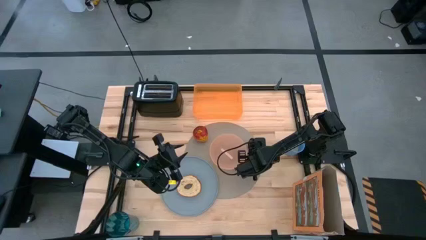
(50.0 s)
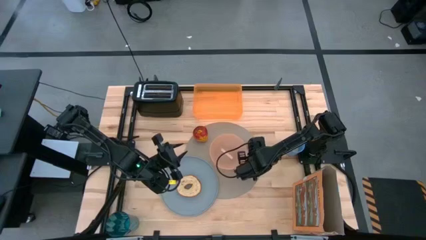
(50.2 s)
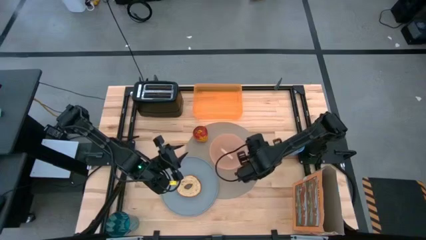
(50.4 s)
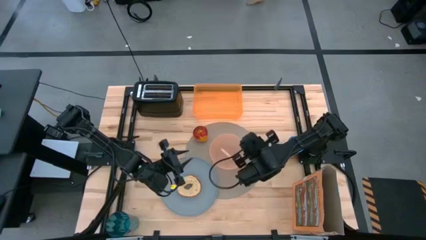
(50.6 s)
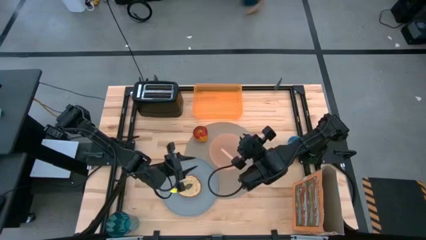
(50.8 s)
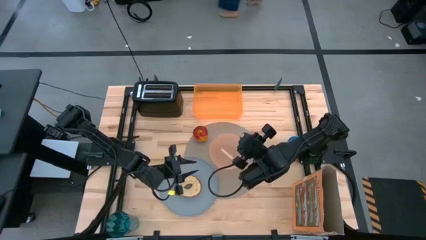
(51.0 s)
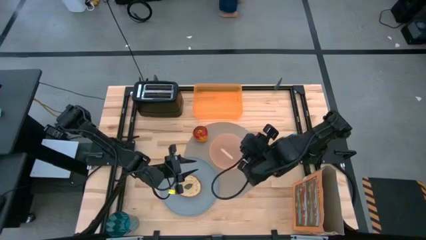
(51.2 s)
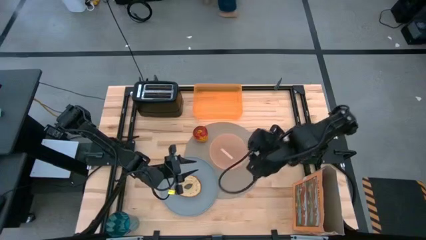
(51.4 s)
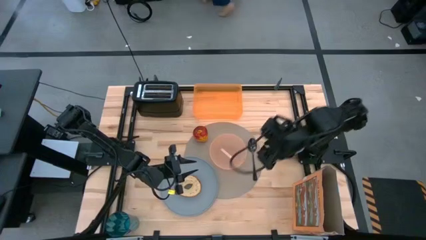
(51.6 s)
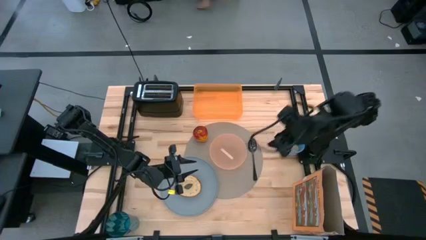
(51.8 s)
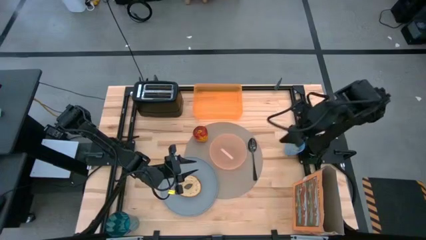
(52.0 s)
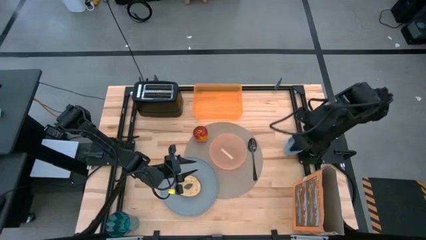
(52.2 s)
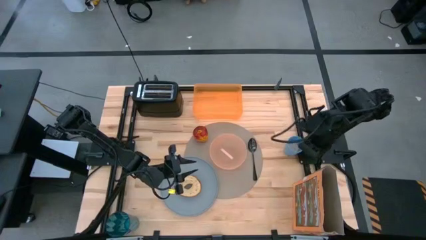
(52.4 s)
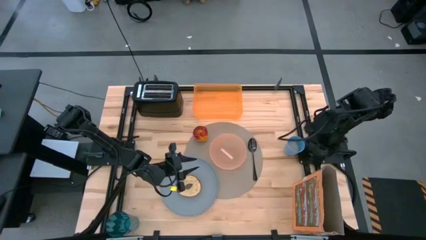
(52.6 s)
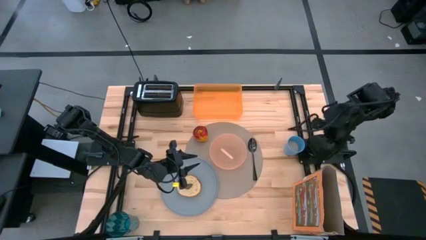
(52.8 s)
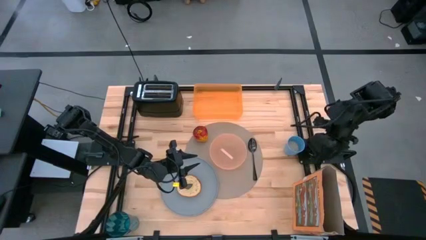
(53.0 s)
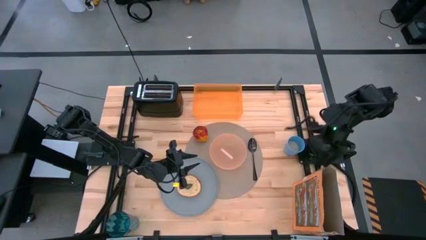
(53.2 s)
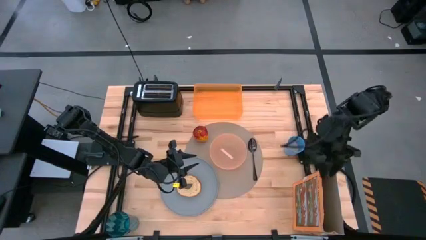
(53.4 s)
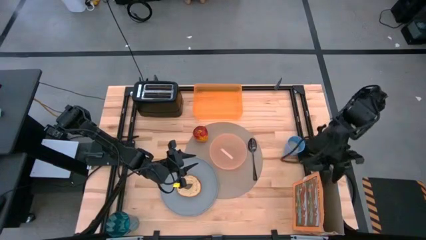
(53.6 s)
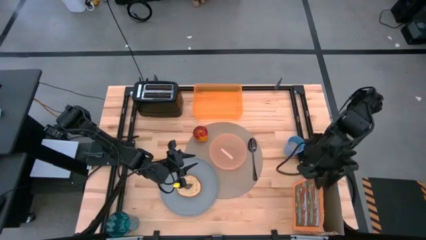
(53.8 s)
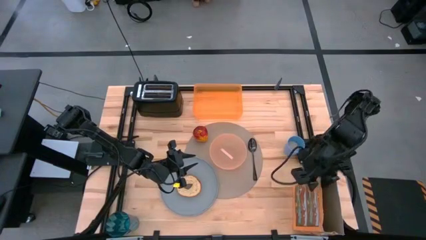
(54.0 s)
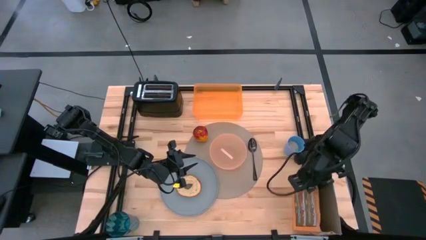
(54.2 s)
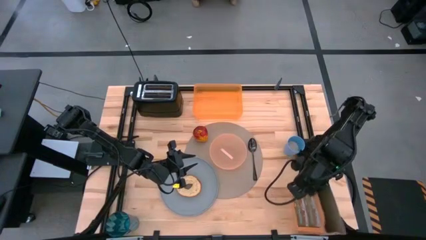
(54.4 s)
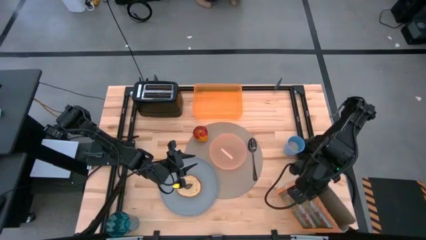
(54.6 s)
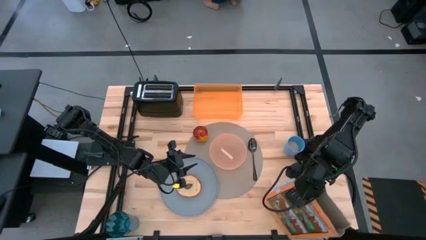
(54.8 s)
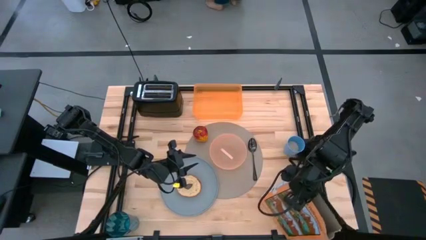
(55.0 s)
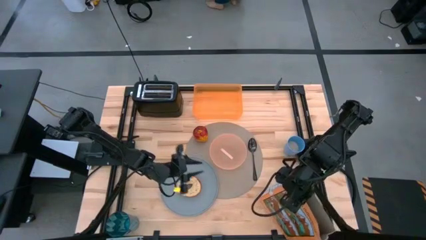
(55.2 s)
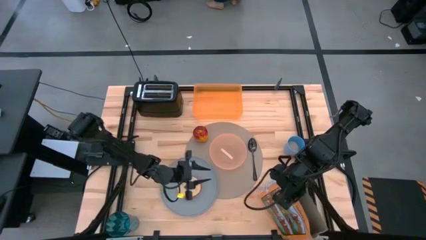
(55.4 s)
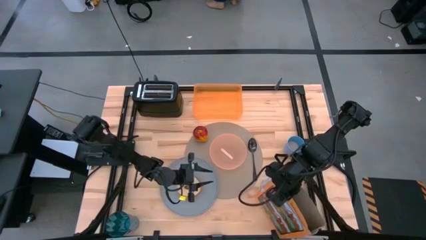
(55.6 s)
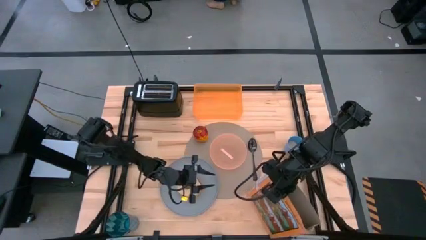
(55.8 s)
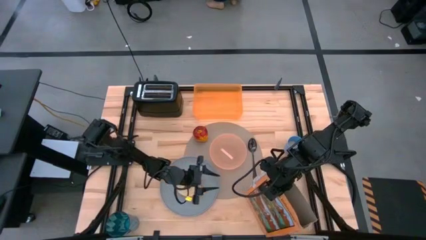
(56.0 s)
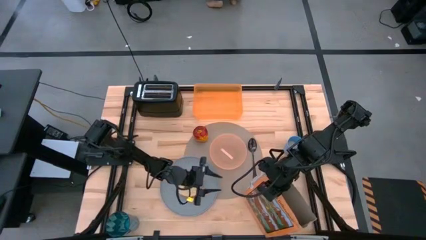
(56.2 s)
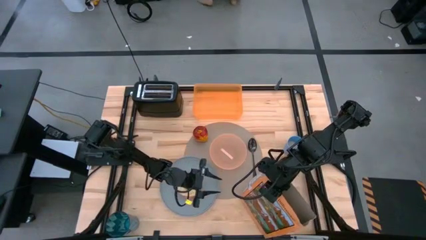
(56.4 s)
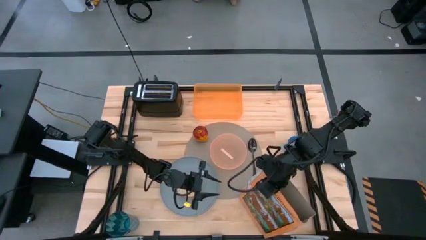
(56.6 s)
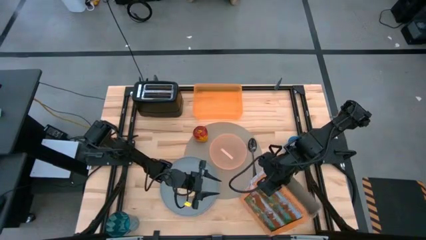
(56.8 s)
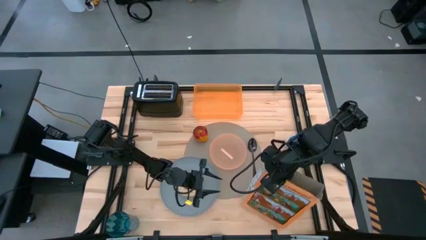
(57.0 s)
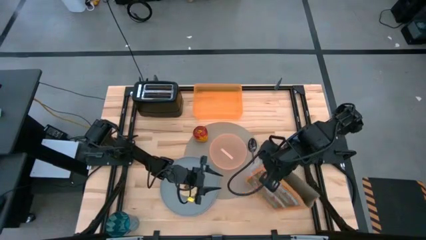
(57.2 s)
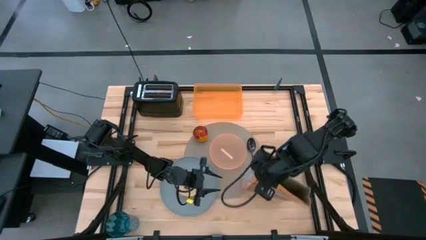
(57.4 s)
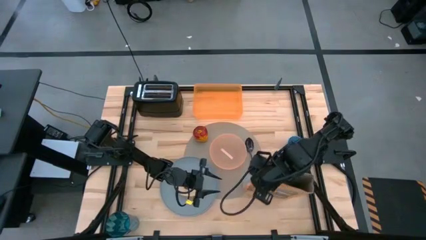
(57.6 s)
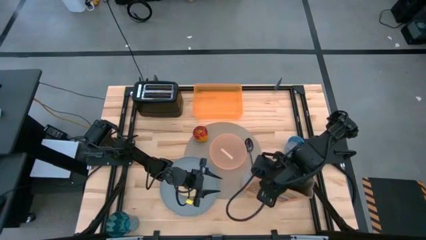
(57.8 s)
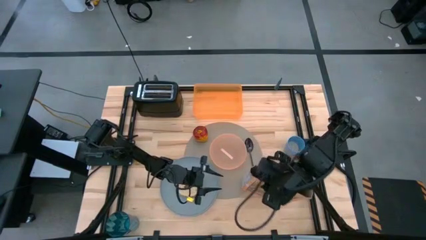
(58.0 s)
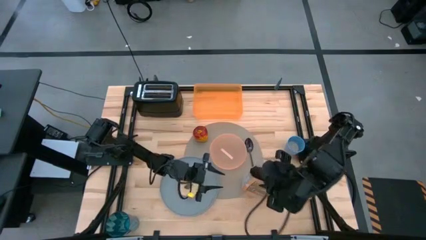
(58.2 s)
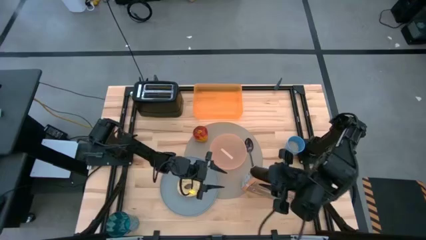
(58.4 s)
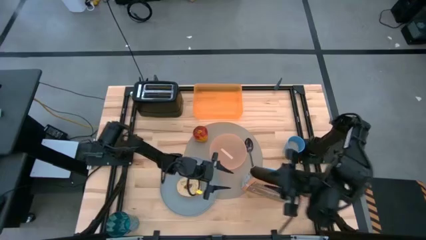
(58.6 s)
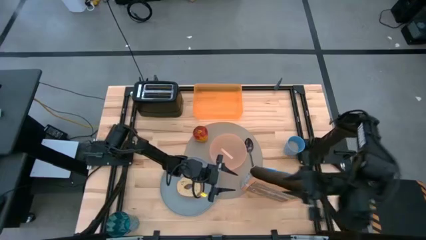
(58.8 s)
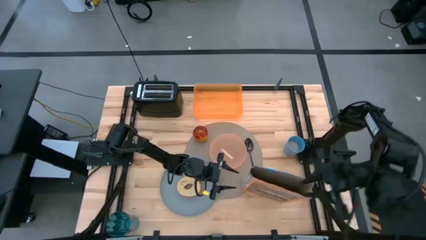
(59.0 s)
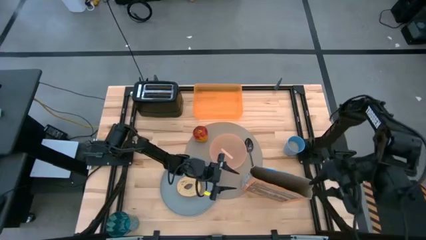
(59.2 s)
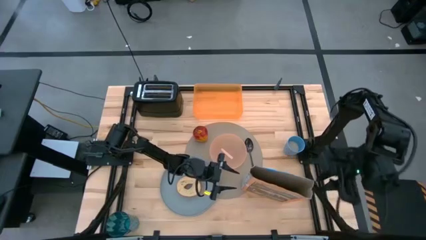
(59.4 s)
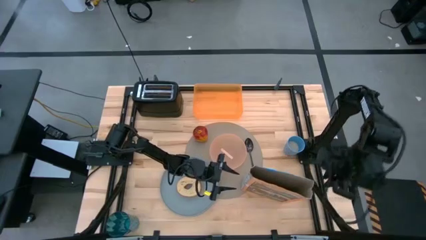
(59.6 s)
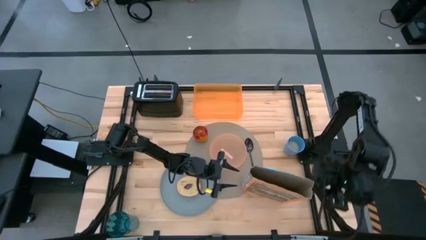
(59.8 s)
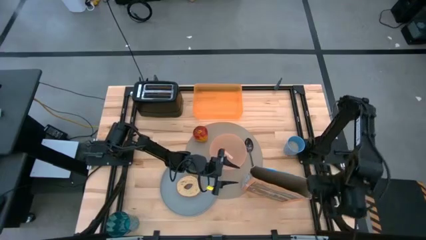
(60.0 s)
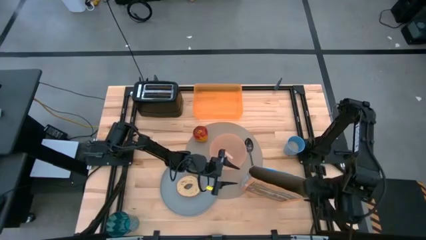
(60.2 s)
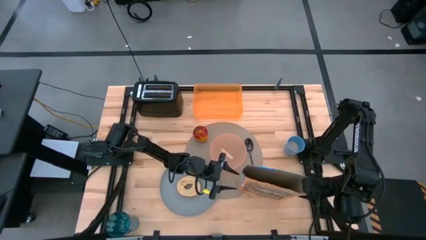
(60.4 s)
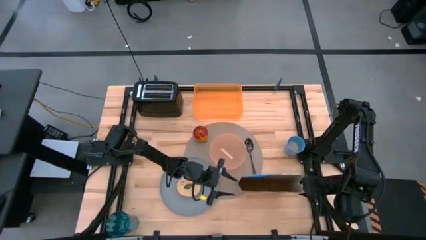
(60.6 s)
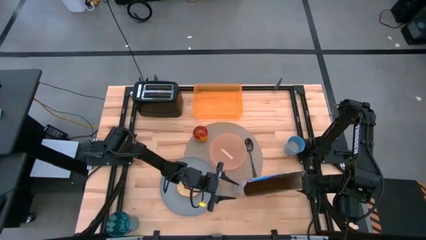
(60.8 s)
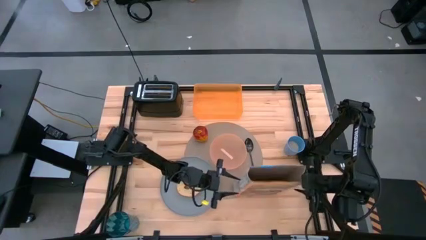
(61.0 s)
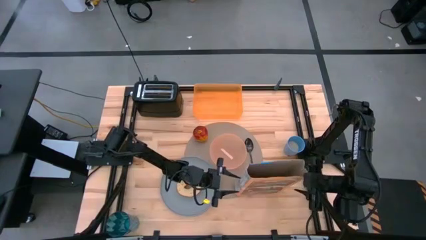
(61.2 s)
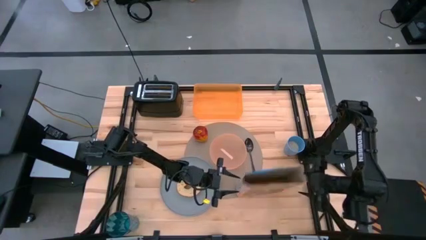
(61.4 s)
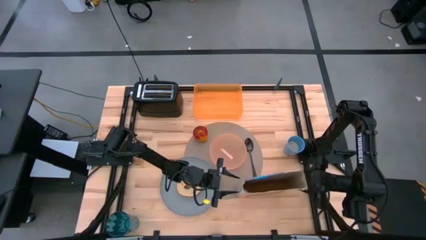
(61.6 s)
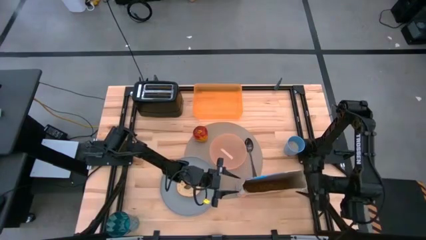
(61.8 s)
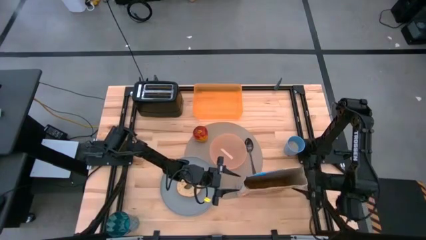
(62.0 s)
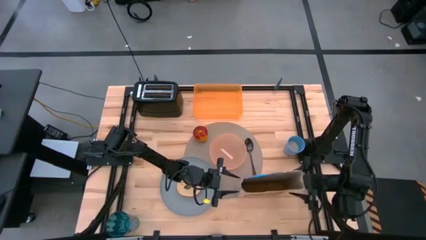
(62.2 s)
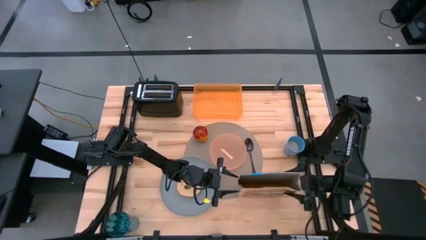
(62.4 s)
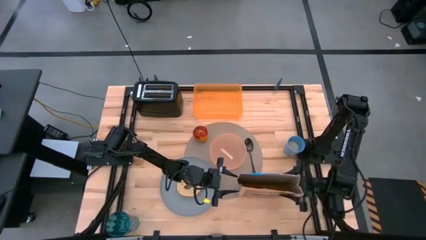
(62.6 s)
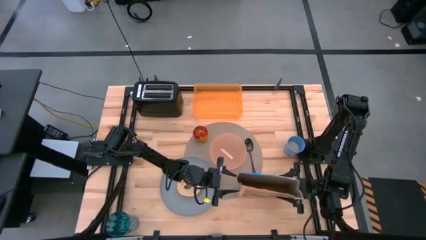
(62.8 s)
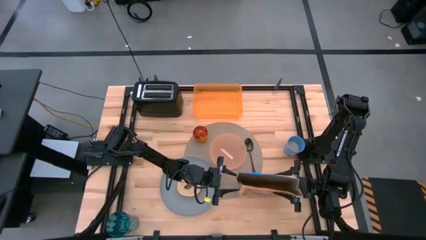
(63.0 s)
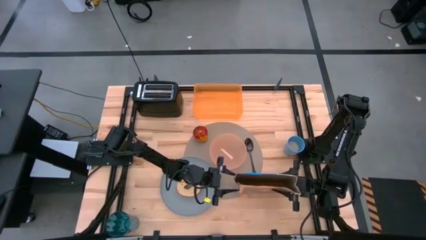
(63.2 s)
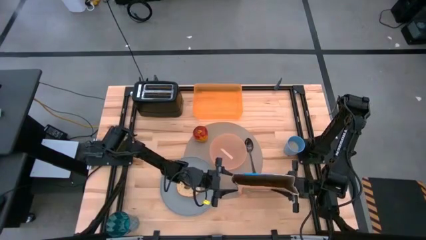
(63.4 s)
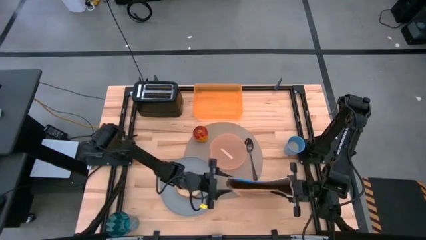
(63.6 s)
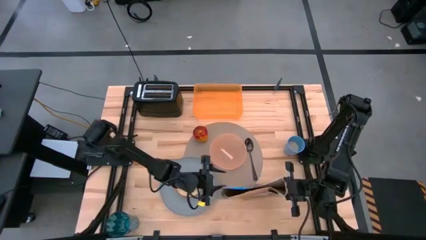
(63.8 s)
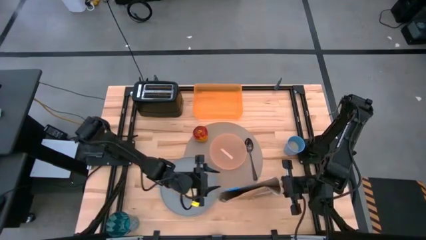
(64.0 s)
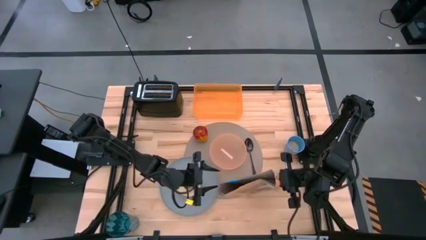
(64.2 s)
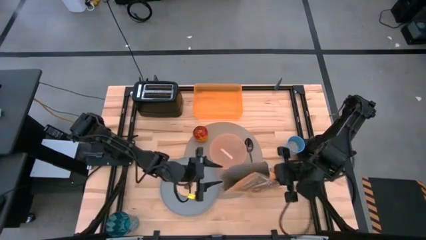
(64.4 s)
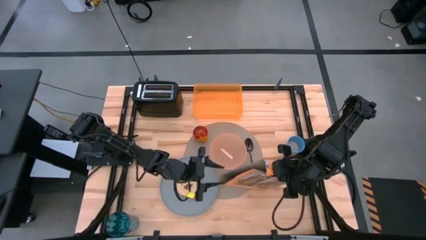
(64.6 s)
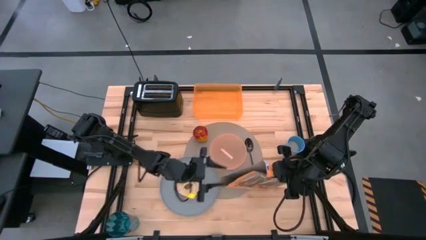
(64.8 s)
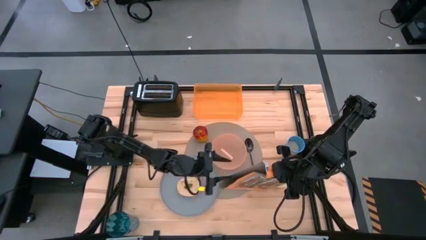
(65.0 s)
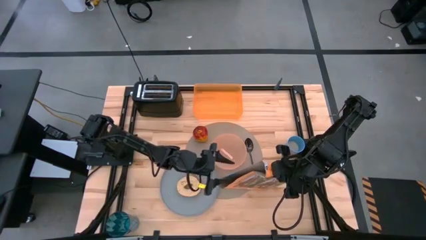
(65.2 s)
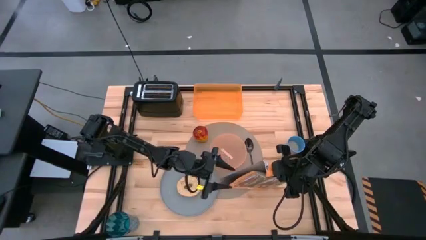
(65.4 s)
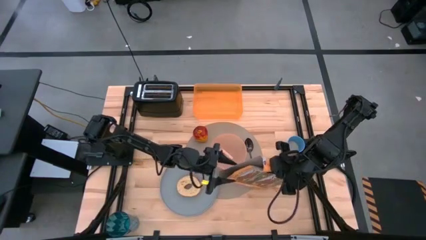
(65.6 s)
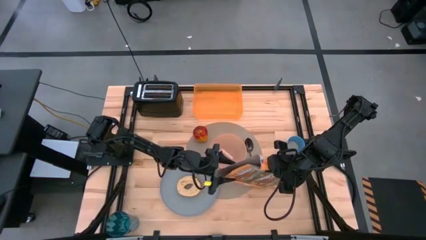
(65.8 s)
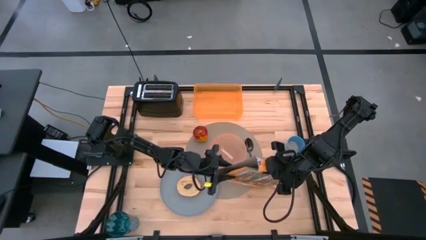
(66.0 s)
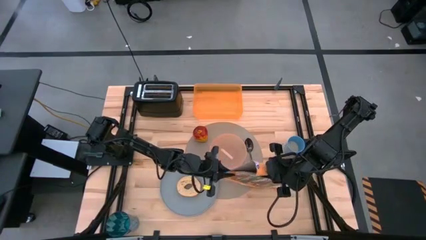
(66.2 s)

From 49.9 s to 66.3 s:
Task: Arrange a breakfast setting
Pour the cereal from the yellow cereal box into the light orange bowl
